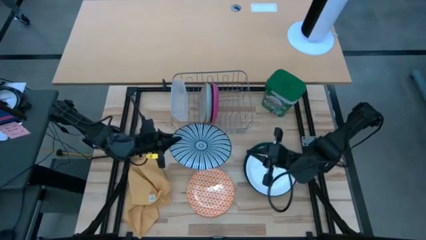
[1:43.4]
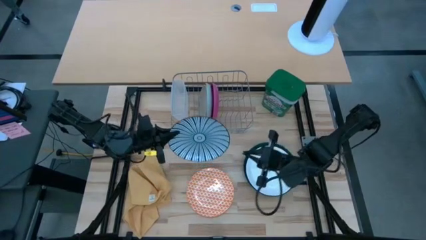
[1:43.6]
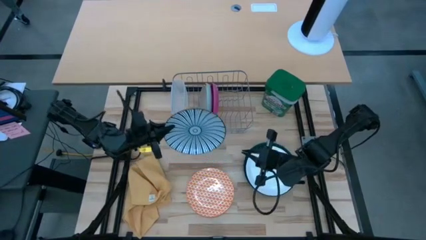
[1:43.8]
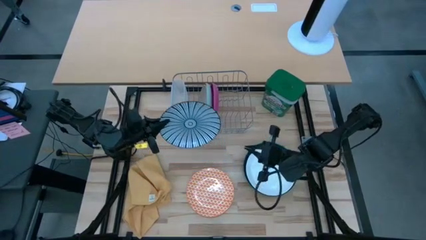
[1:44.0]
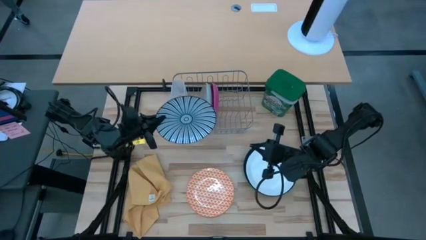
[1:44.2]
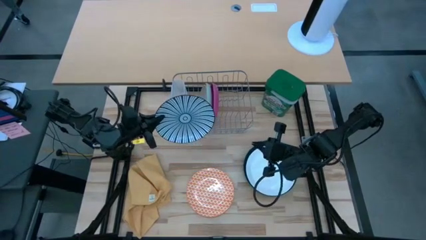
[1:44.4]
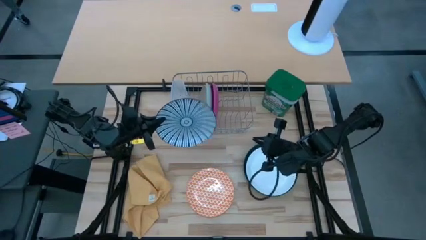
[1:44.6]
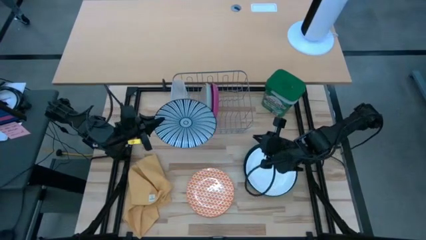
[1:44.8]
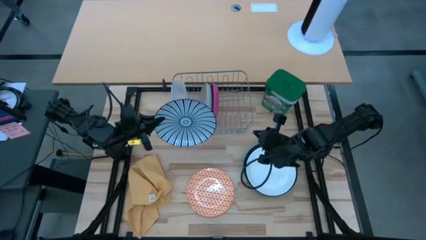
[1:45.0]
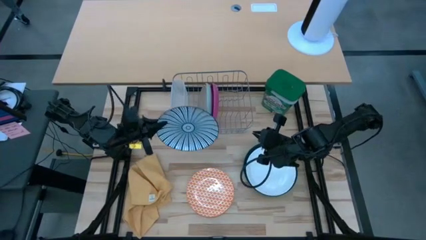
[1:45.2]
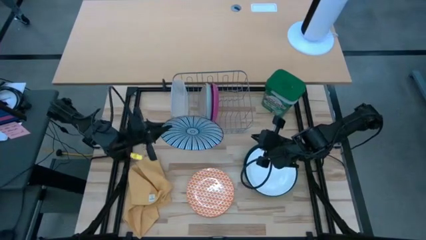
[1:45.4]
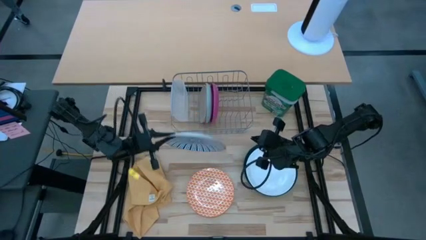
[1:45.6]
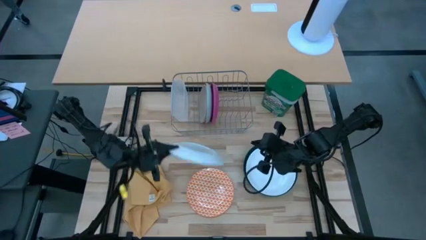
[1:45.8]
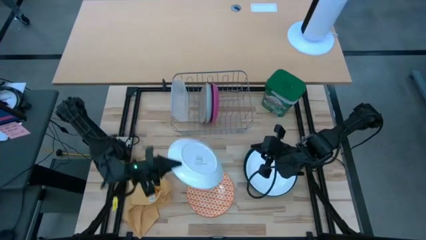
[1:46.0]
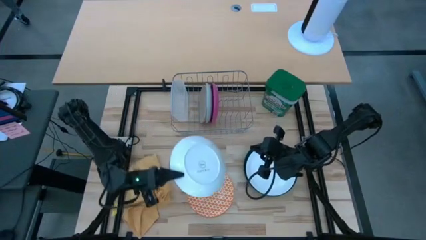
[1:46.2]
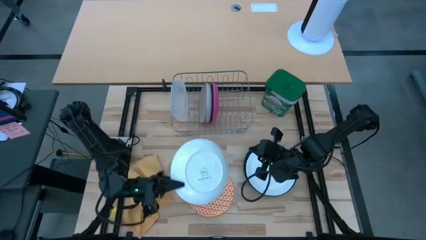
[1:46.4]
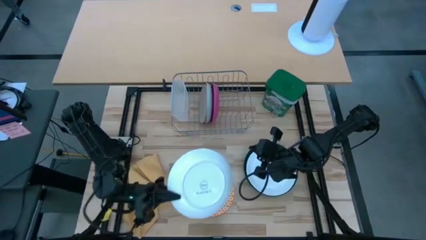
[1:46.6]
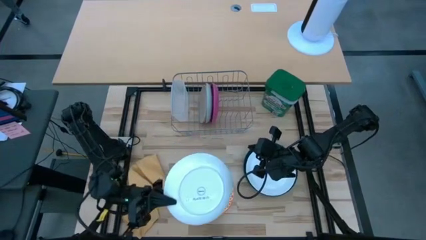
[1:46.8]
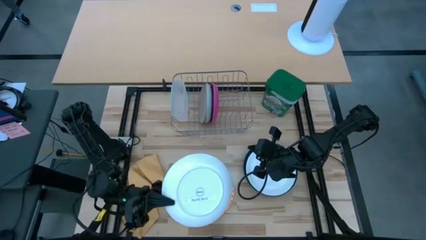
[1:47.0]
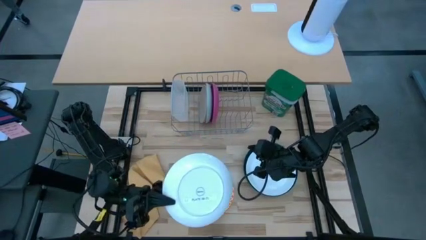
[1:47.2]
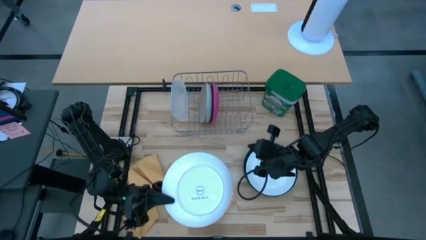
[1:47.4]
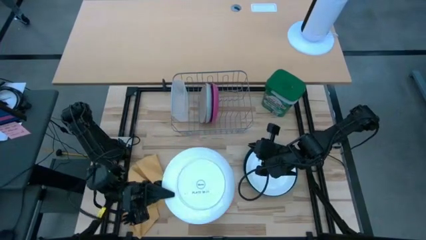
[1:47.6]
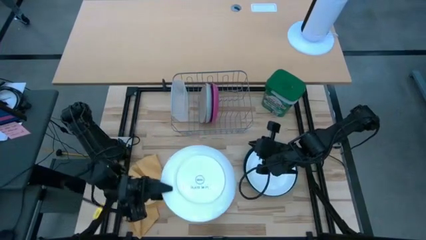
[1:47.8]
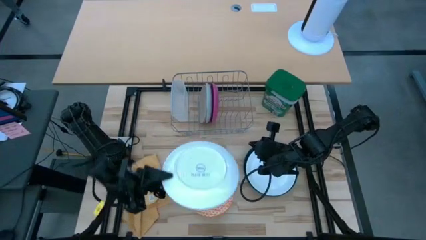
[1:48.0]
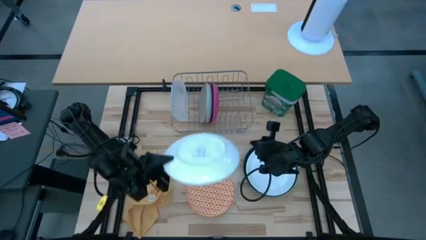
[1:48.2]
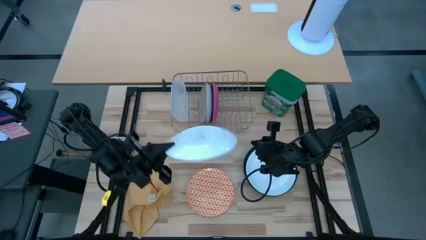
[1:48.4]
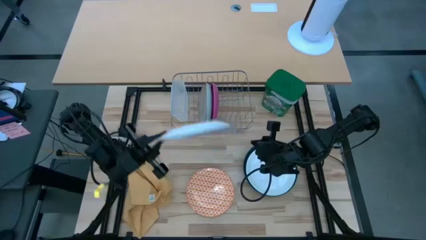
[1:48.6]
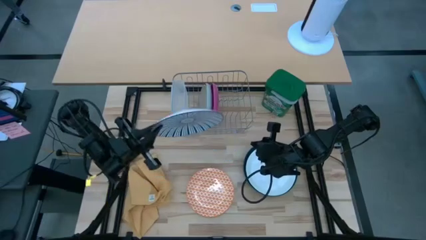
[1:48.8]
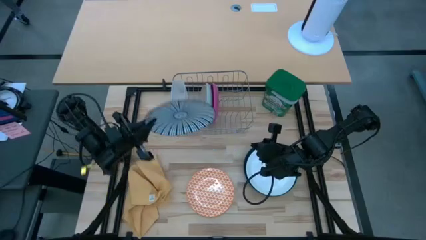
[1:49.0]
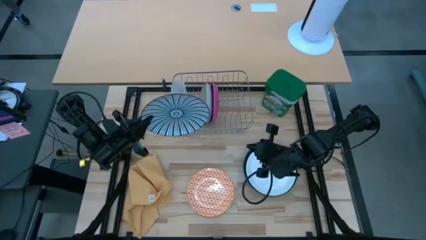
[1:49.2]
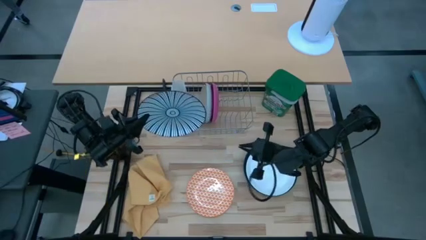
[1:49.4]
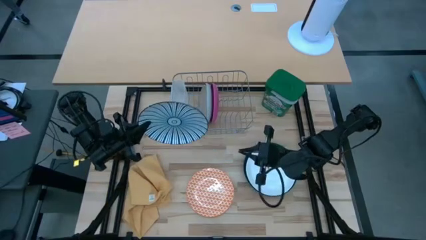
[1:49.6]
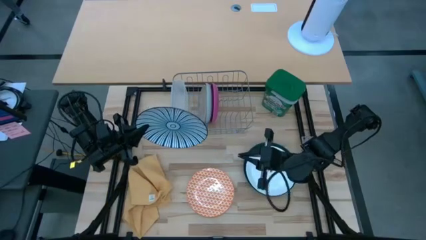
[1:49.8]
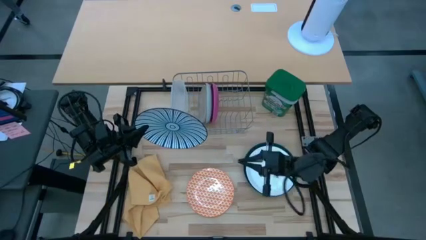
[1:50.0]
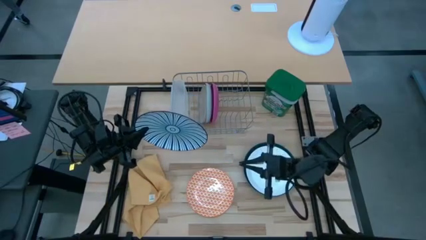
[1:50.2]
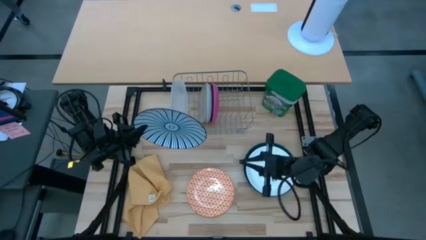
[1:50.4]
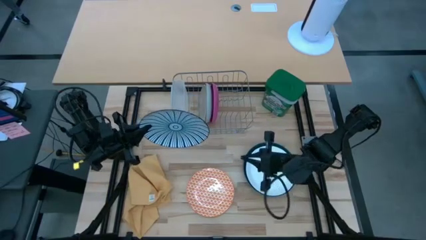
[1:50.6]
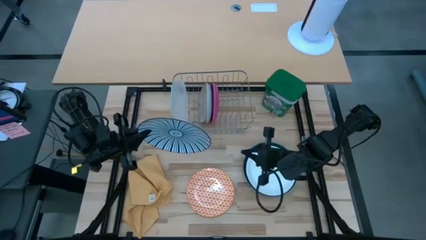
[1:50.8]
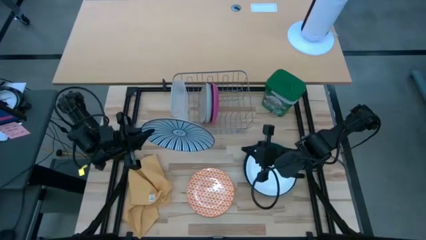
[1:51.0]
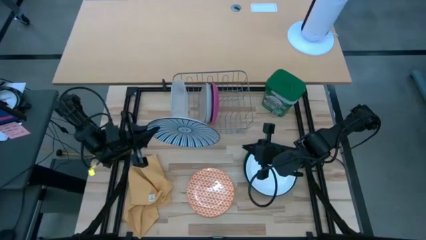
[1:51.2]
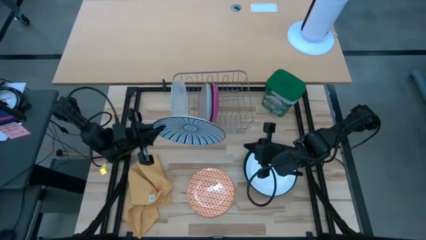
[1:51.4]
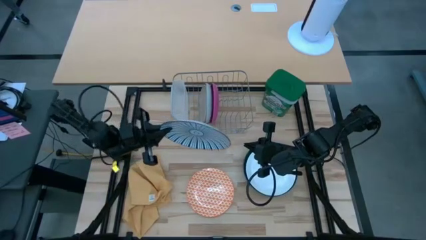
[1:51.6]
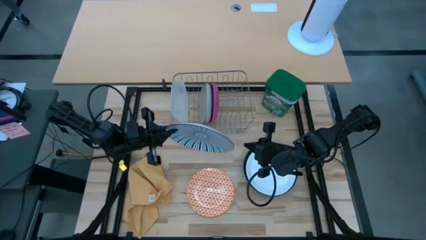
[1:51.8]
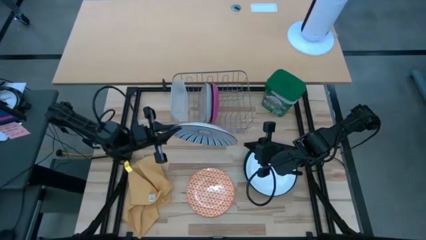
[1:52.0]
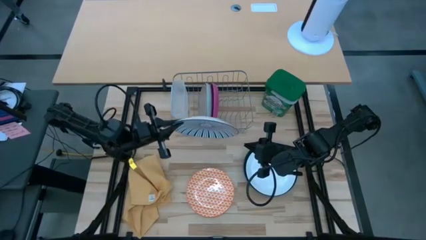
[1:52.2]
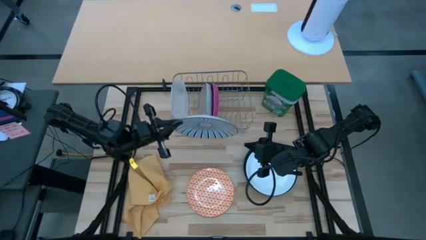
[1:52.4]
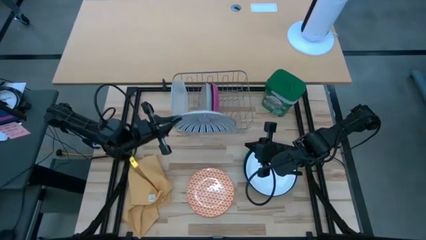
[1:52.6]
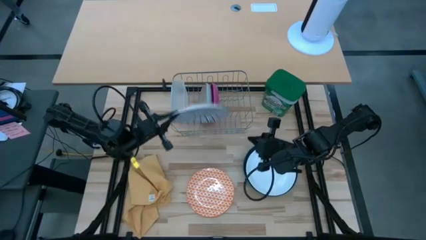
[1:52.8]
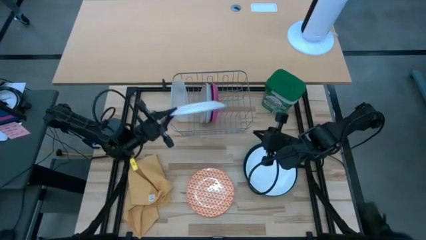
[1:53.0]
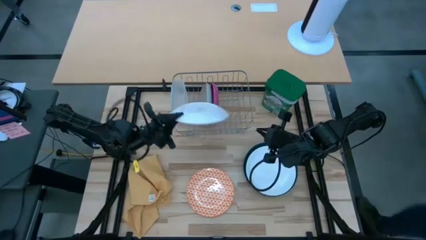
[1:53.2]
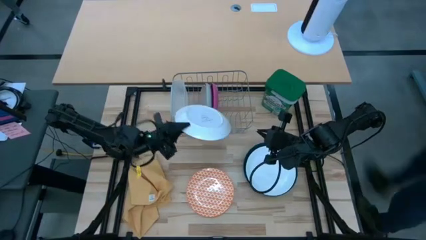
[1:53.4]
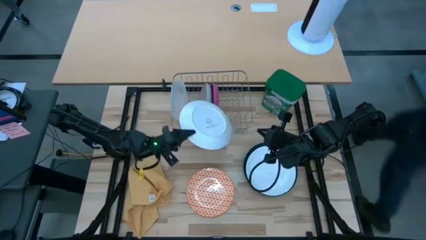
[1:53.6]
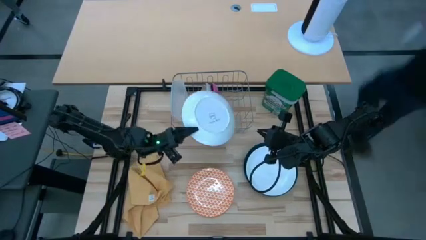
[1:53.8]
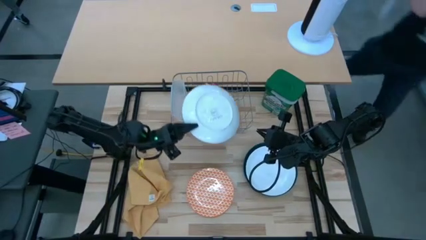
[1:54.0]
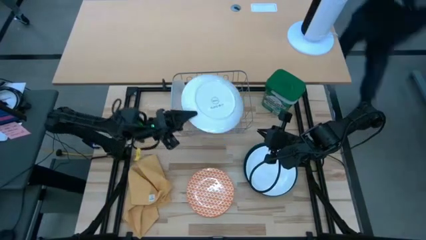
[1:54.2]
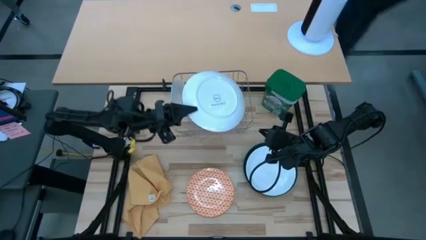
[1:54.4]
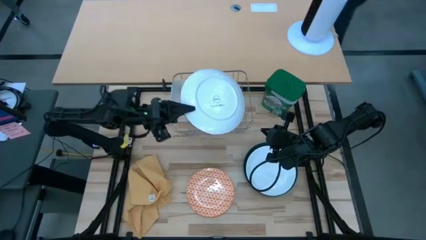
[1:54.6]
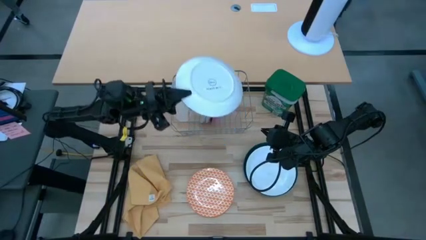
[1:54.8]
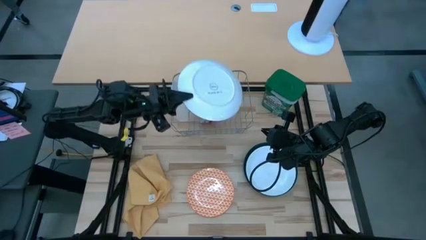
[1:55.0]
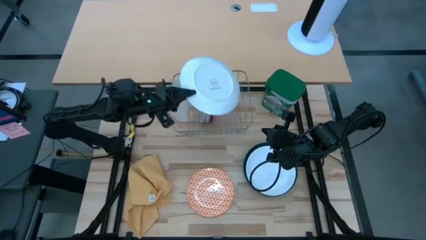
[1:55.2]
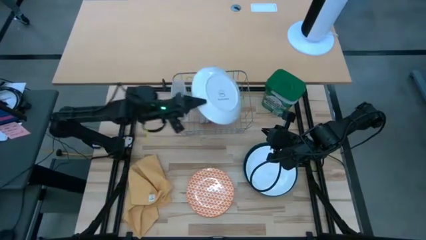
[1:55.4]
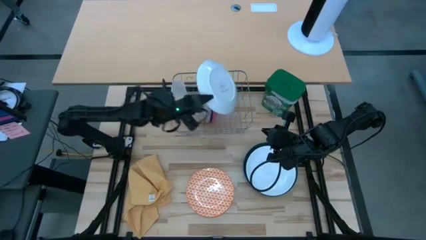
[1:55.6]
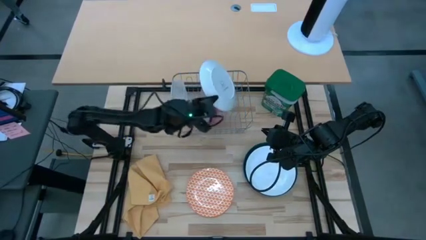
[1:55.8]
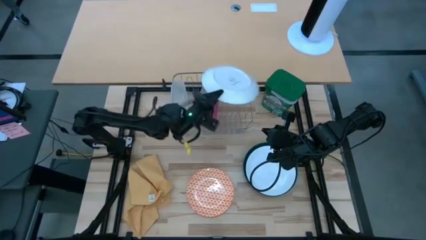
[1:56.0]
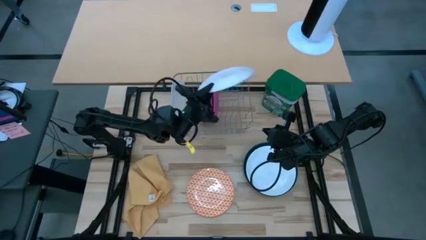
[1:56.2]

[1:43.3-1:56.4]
Task: Sort dishes
Put the blue patterned plate into the dish rack

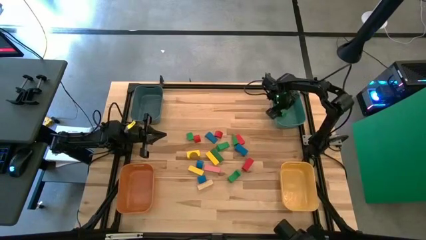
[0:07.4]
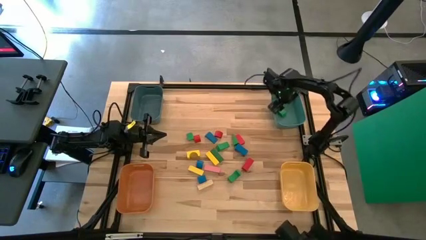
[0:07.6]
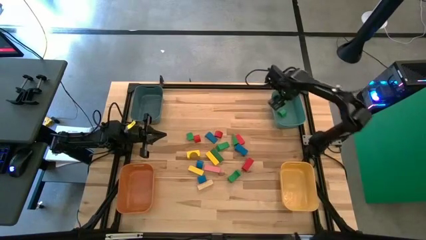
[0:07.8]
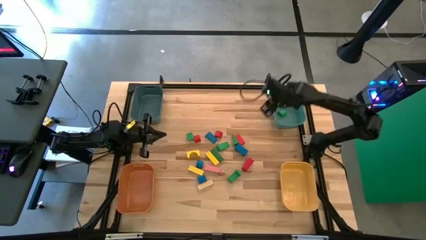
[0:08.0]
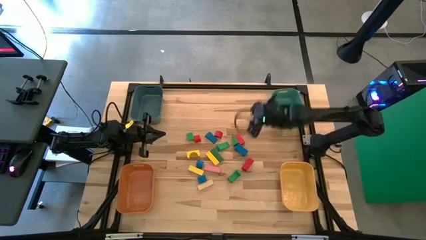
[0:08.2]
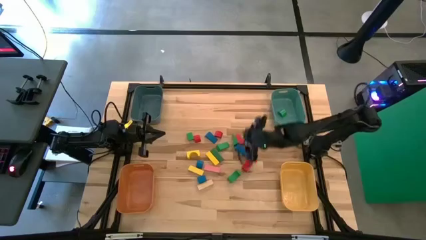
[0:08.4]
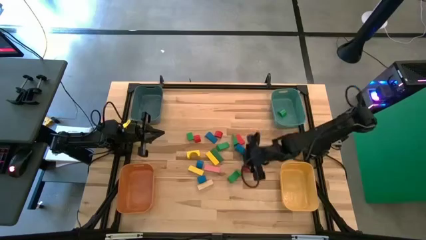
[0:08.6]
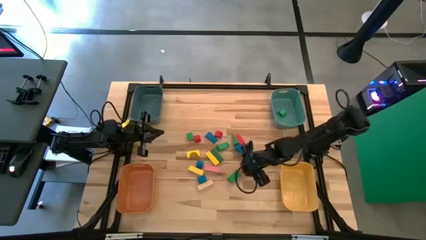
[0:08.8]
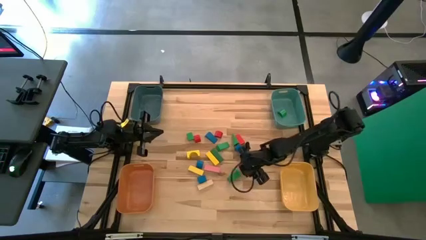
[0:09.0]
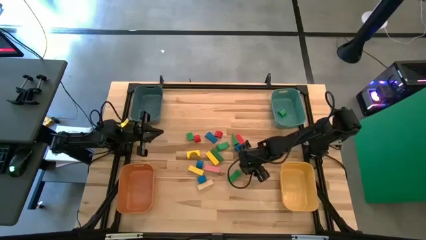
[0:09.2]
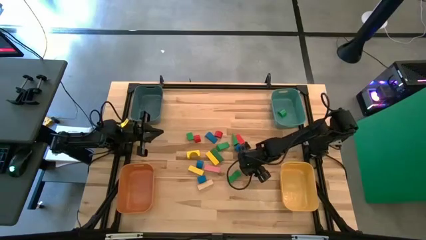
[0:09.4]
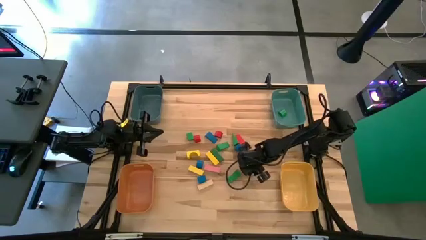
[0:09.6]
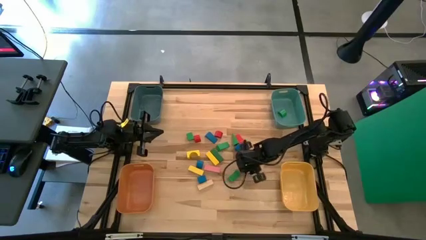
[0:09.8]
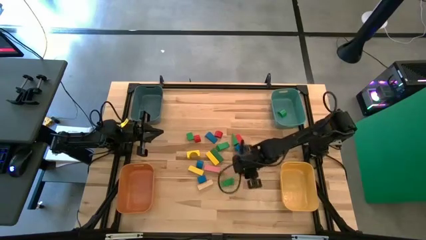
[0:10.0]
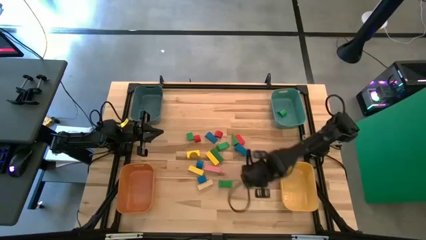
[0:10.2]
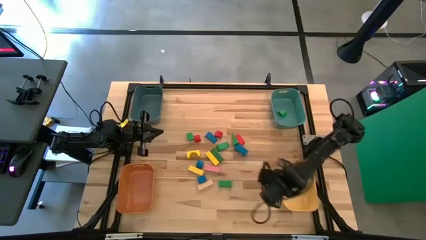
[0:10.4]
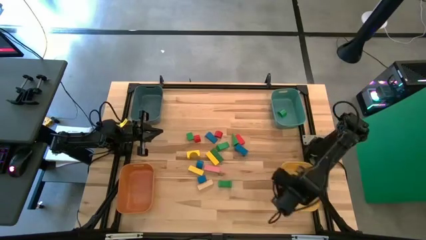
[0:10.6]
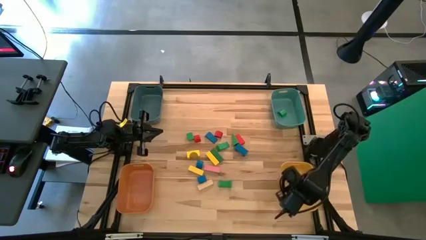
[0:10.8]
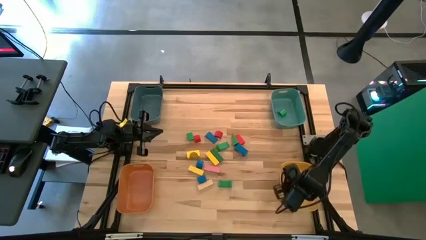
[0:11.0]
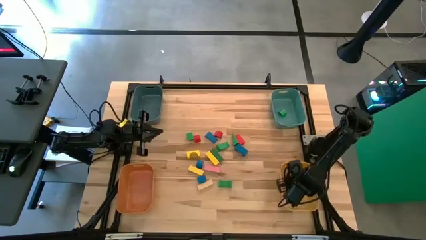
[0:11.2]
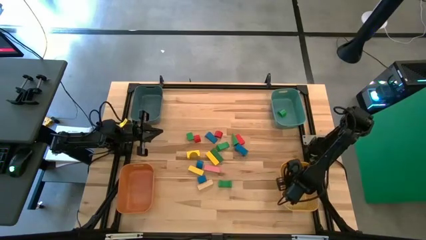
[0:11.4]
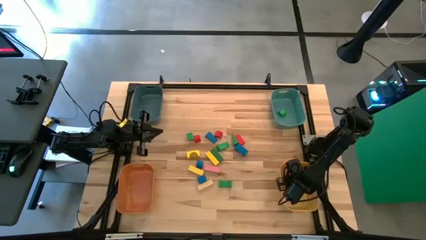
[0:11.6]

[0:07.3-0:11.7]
Task: Sort blocks by size
Put the red arch block into the yellow bin
